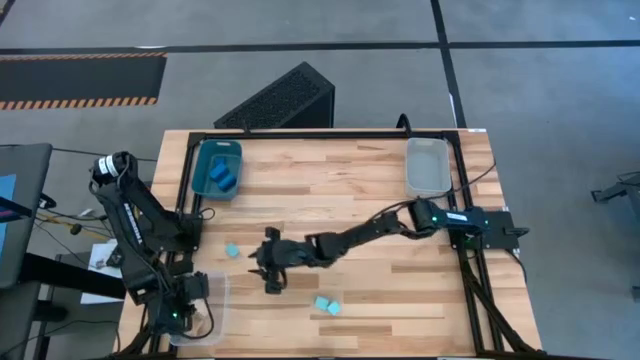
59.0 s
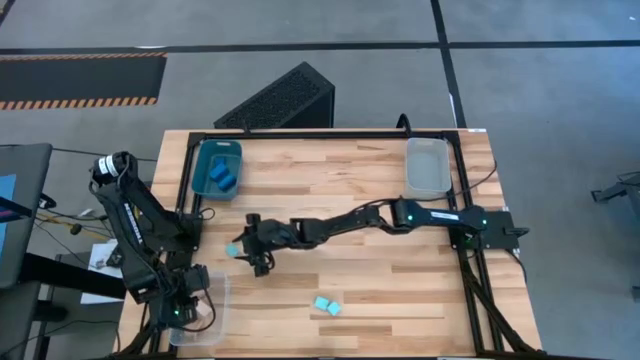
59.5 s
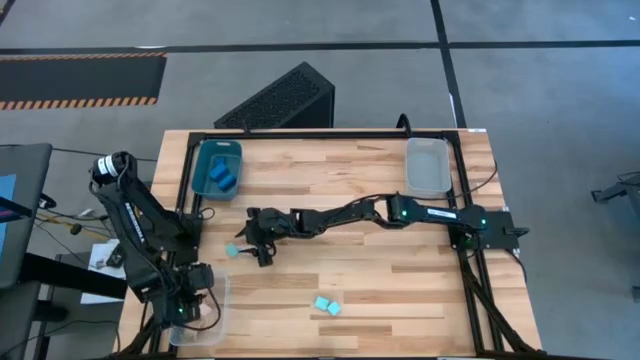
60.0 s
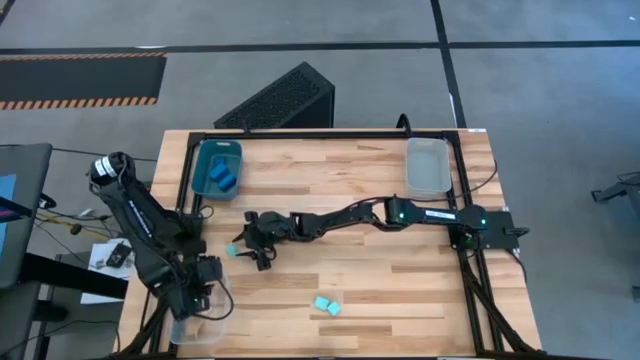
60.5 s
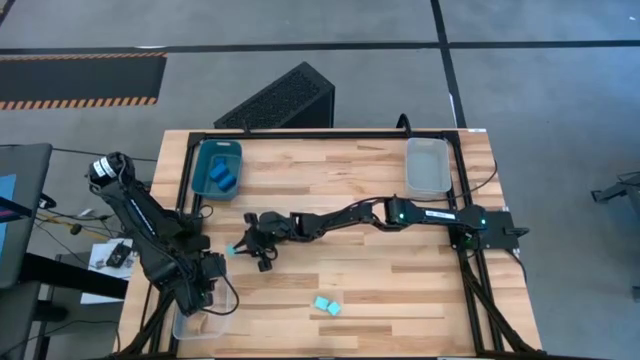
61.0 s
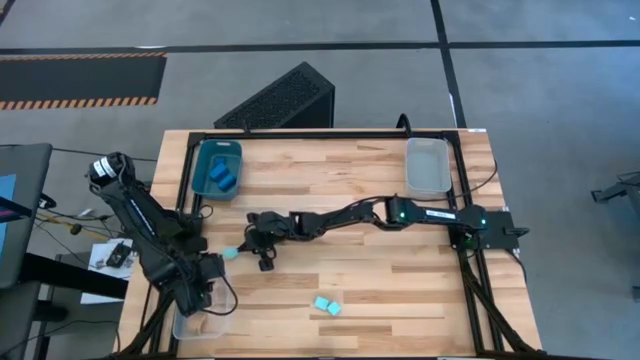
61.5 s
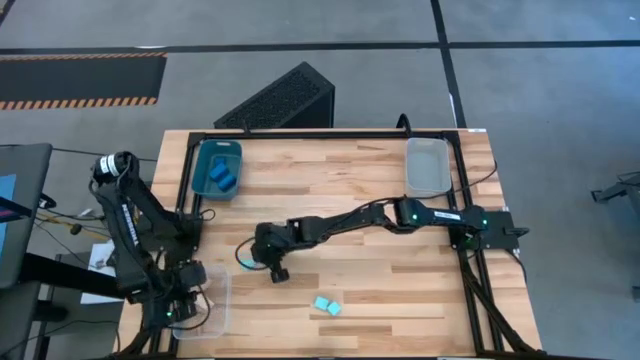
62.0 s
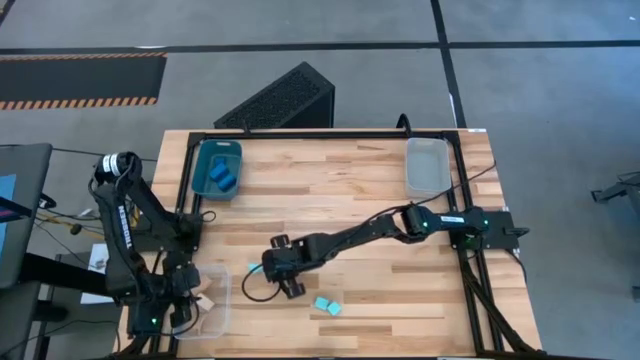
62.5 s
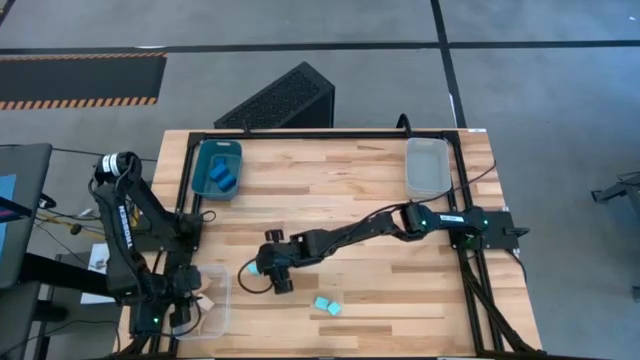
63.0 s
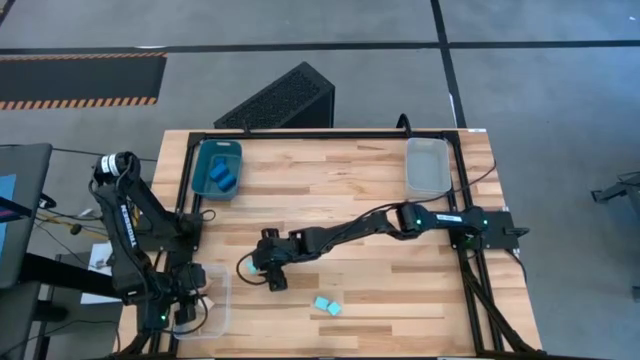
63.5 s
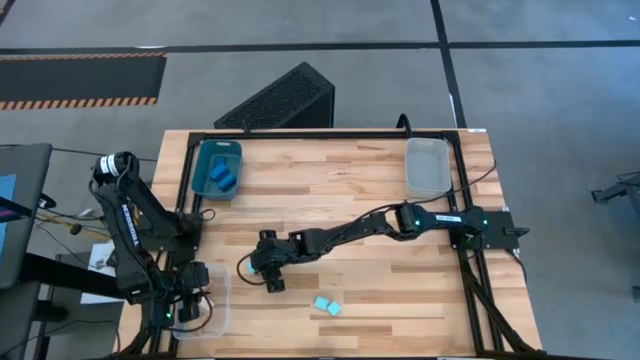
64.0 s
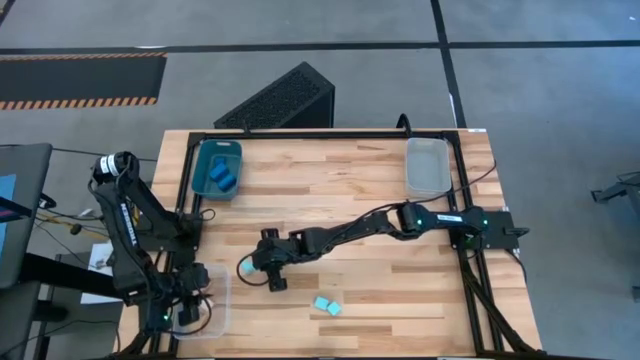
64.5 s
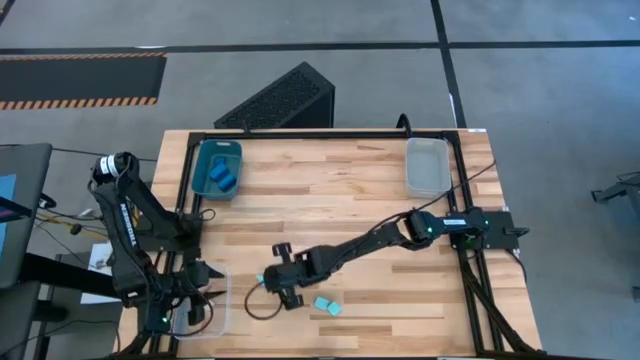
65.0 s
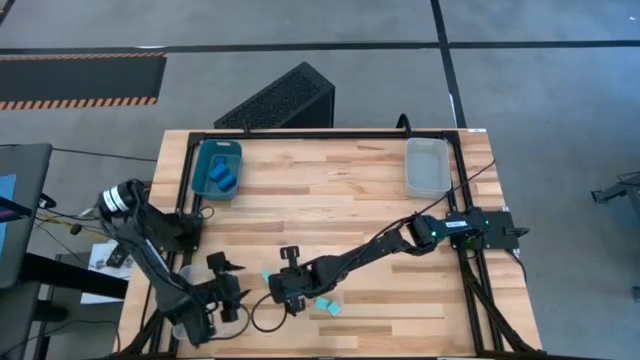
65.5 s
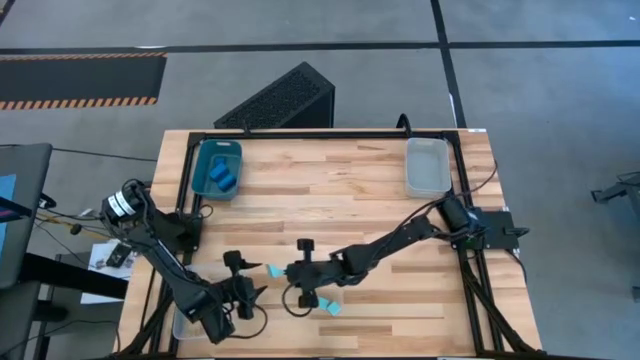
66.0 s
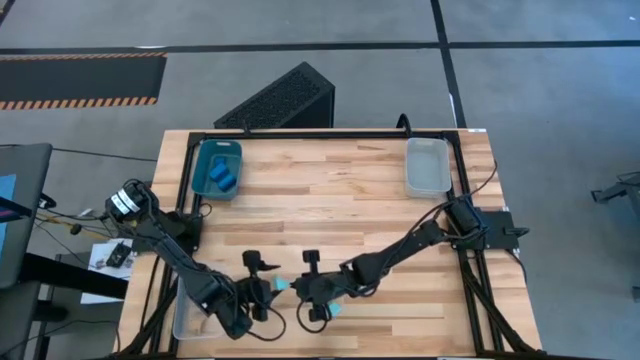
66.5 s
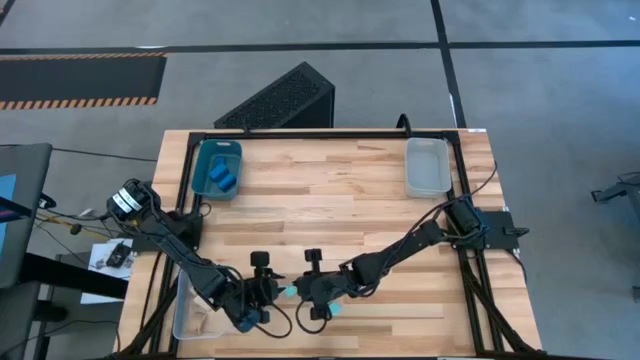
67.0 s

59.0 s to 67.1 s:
Task: Sort & place blocks by color
Put the left light blue block into the white bin

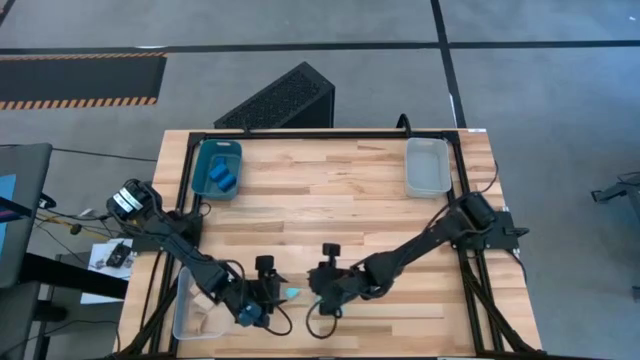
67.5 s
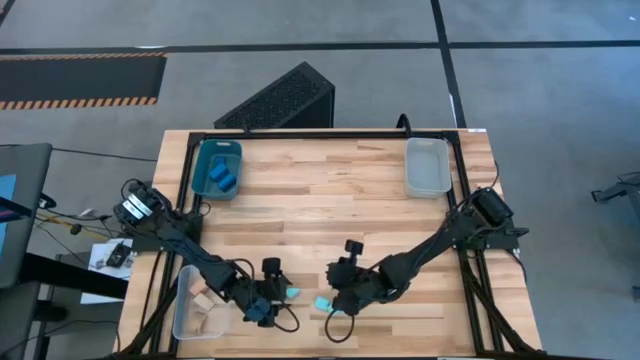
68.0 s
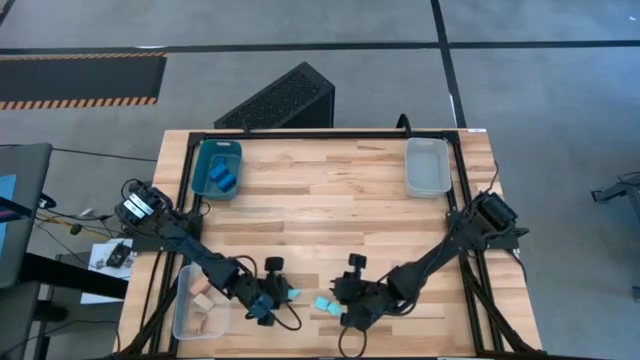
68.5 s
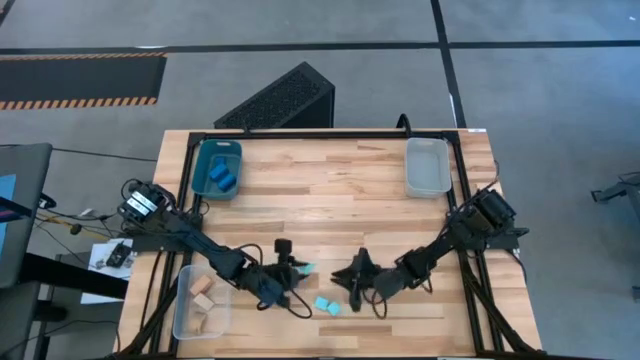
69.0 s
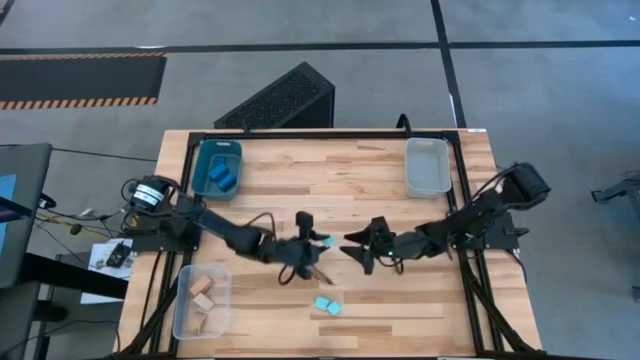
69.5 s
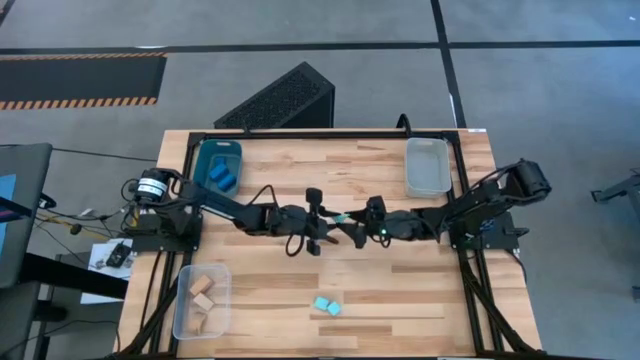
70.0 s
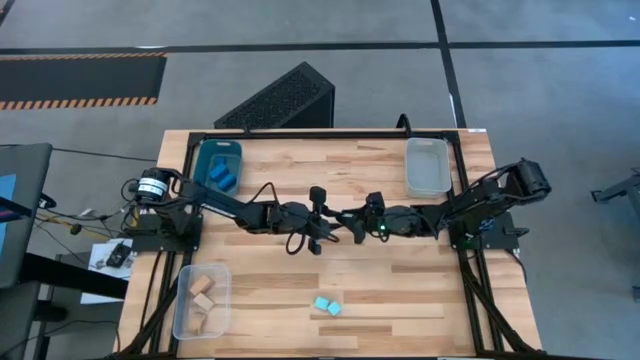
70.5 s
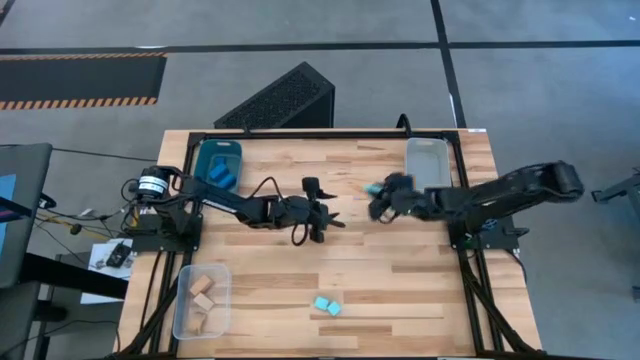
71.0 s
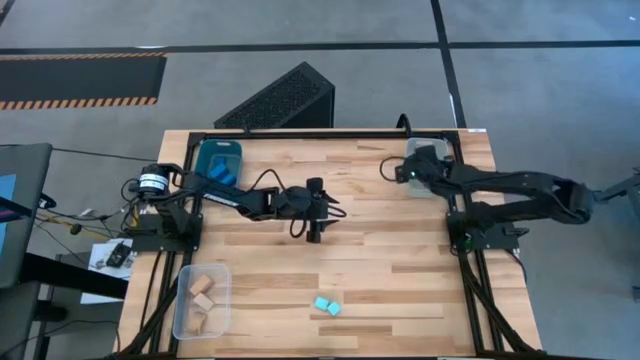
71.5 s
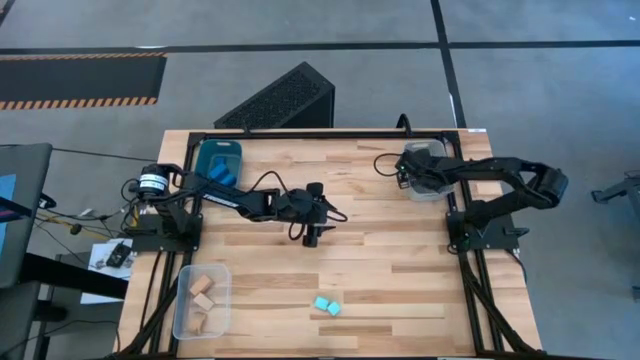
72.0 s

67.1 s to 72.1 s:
Put the left light blue block into the white bin

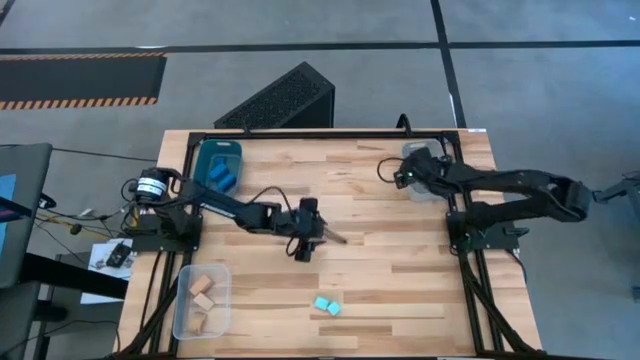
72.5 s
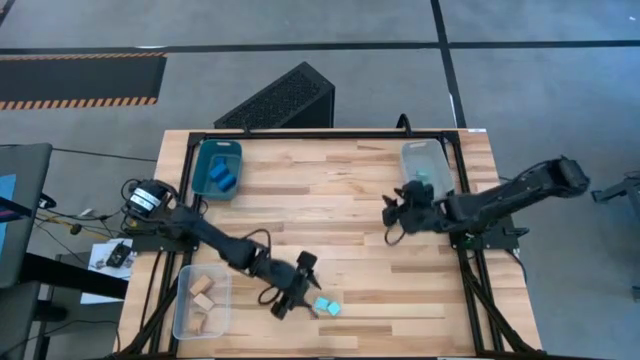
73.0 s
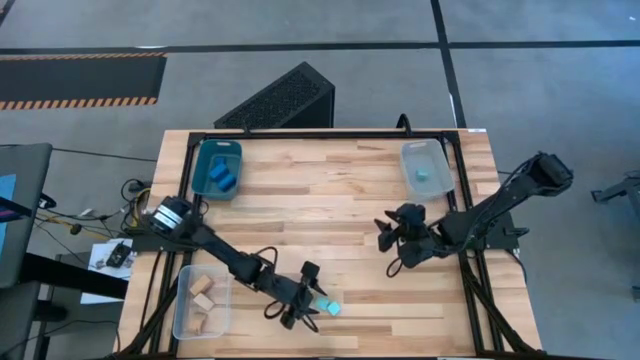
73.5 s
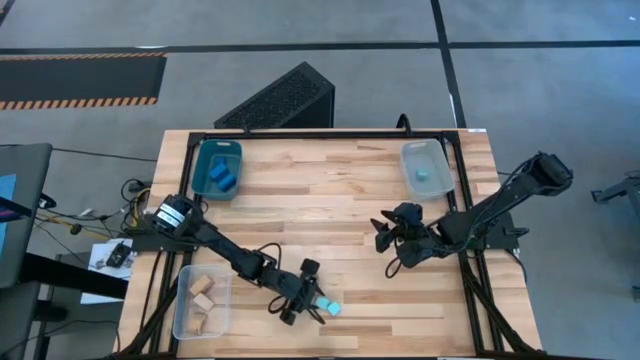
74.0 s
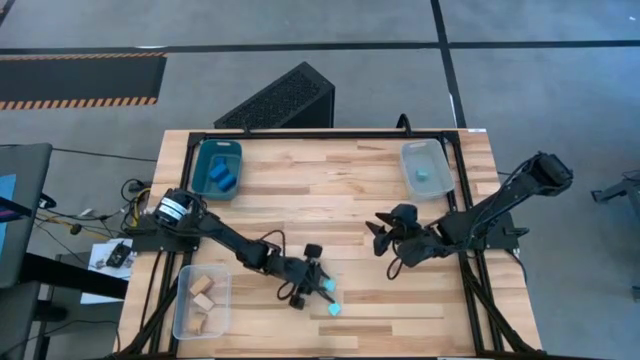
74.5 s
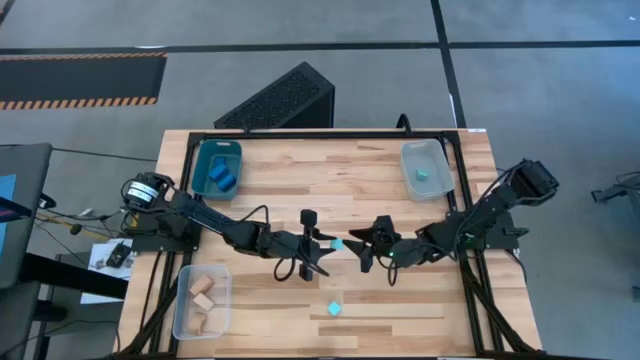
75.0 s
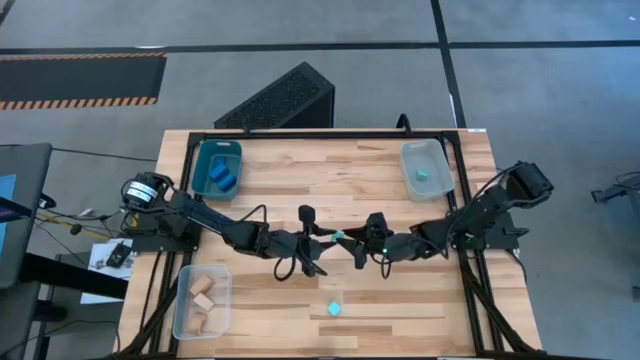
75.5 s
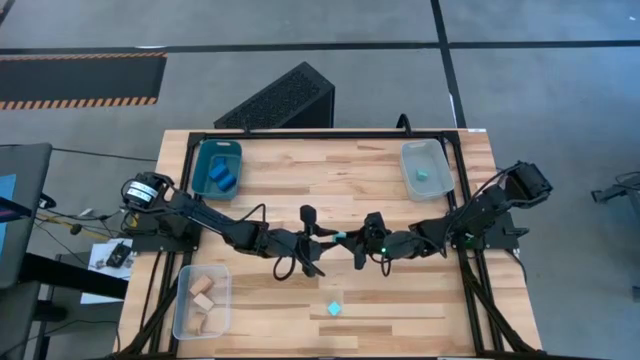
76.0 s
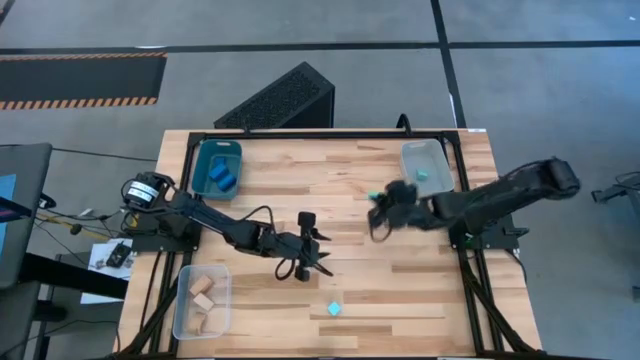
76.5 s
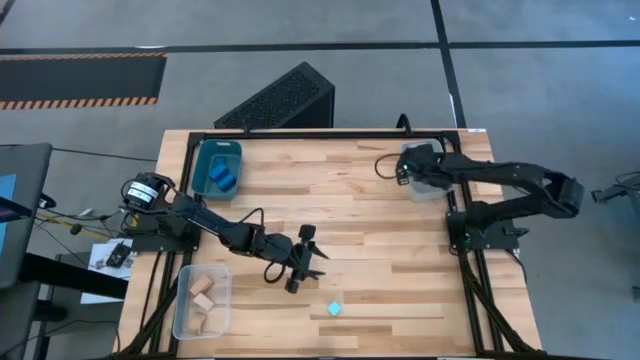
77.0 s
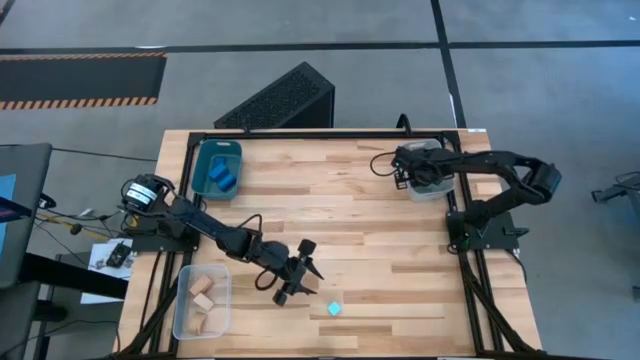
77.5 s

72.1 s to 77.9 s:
Put the left light blue block into the white bin

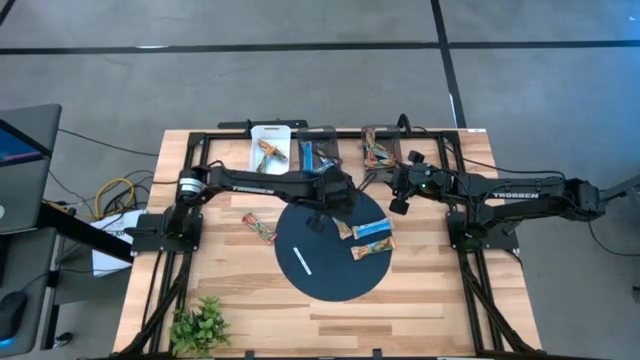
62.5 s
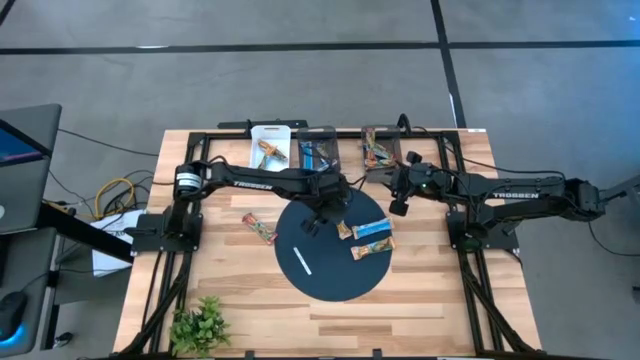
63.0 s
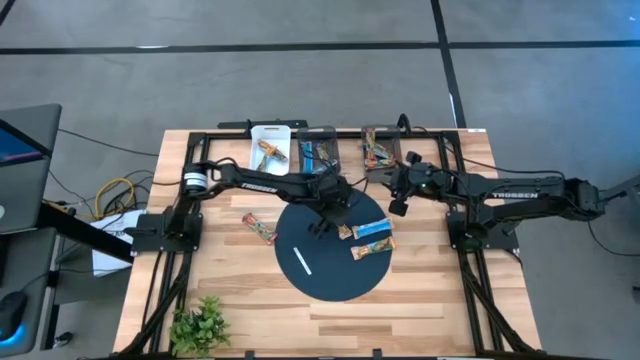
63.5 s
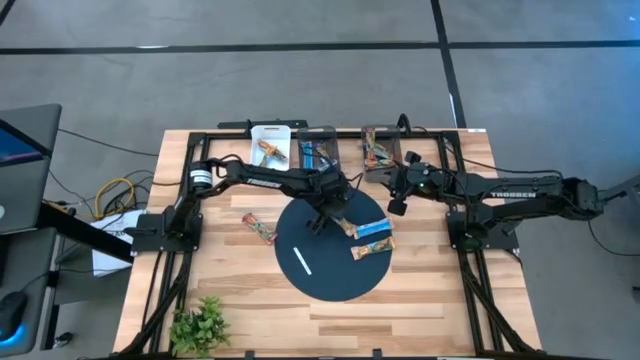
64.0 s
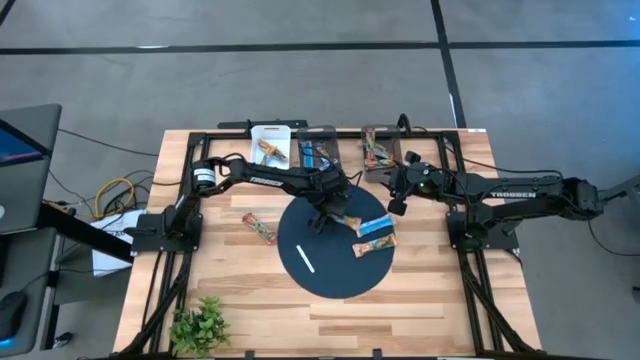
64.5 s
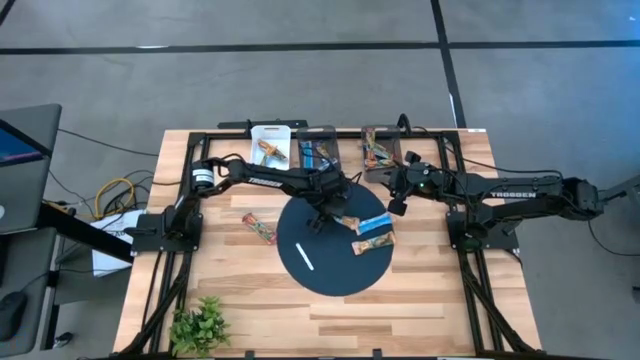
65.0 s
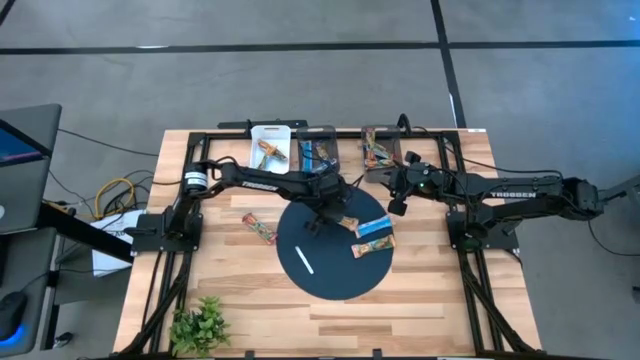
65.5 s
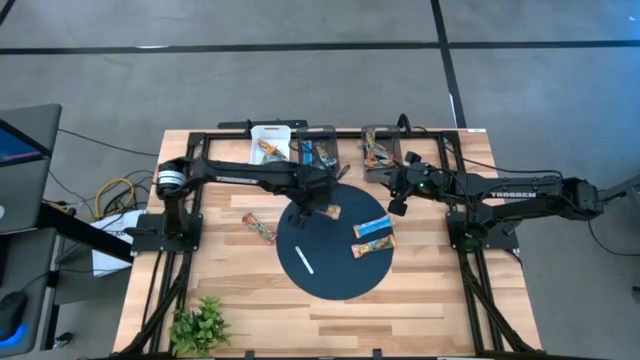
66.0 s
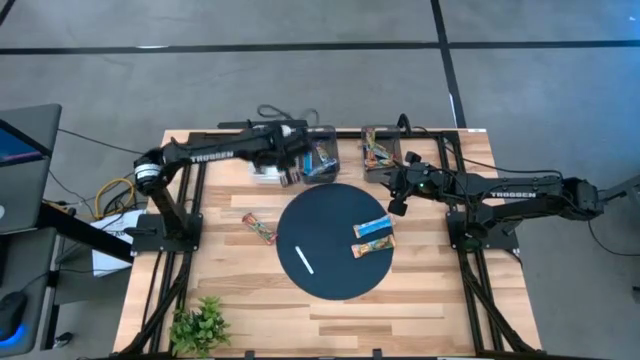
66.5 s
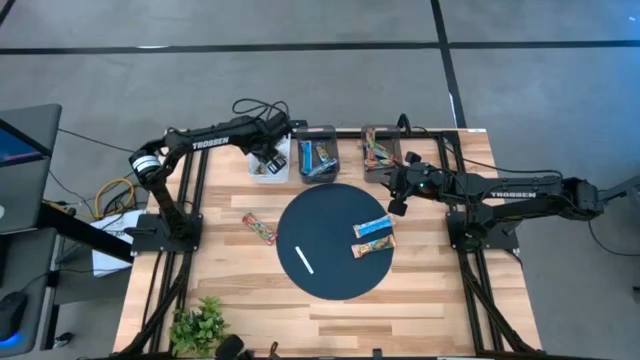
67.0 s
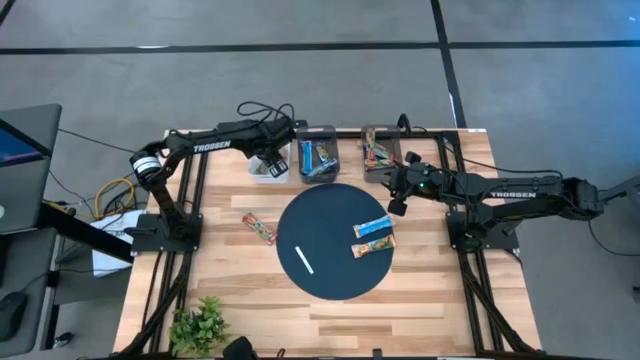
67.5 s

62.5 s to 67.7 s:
Task: Pick and place Granola Bars by type
Put the orange granola bar into the white bin
